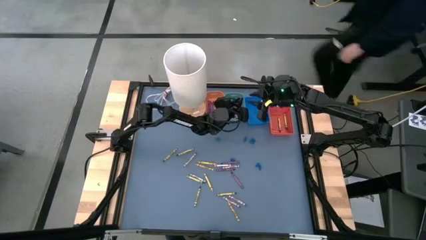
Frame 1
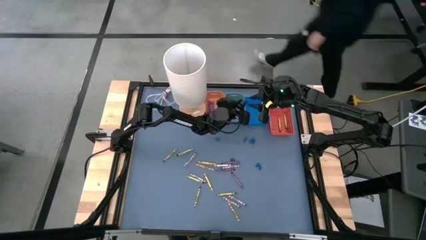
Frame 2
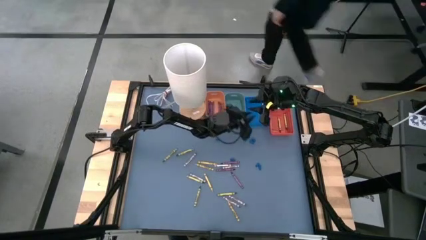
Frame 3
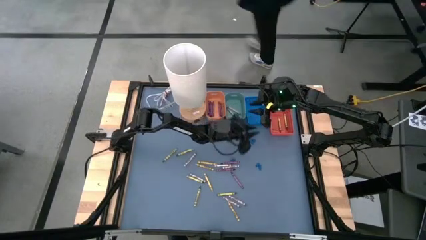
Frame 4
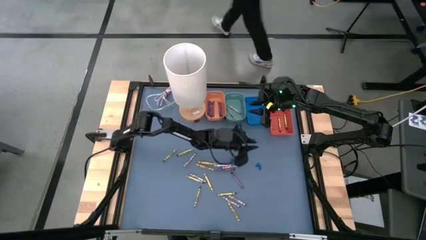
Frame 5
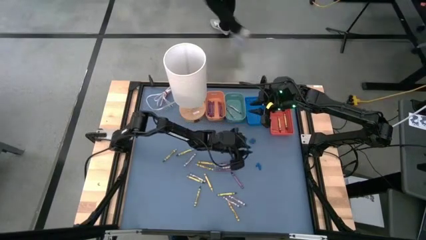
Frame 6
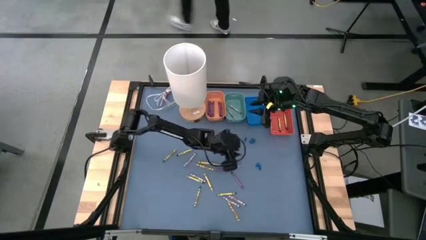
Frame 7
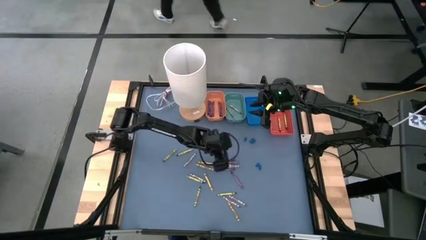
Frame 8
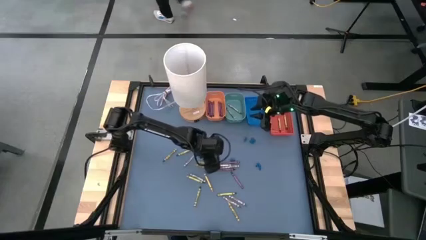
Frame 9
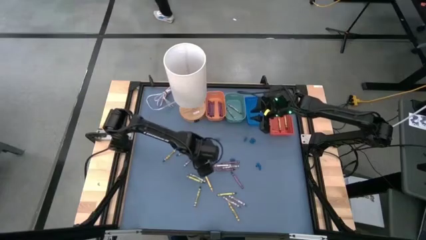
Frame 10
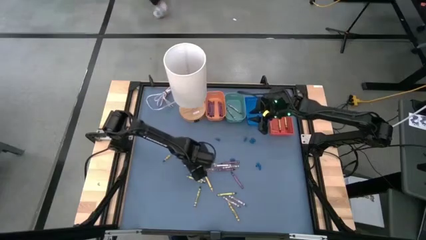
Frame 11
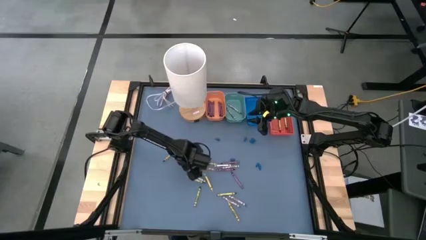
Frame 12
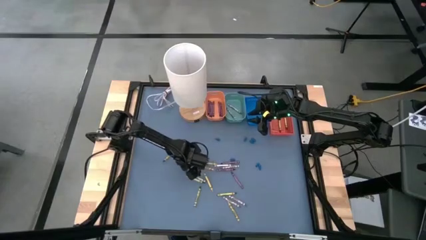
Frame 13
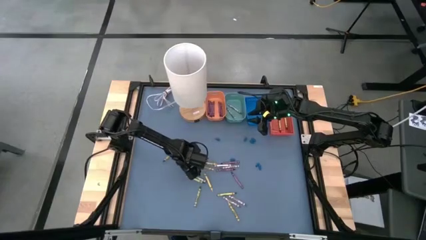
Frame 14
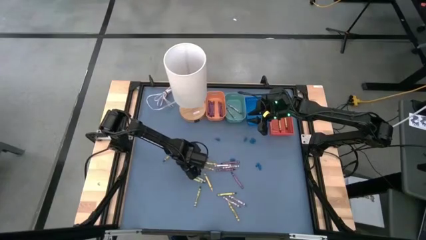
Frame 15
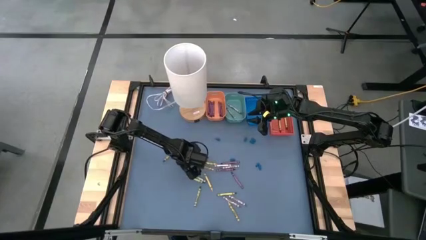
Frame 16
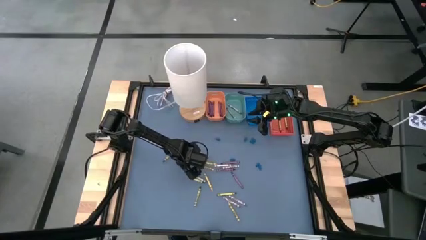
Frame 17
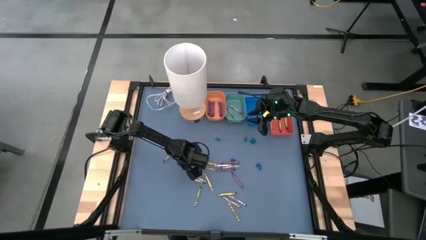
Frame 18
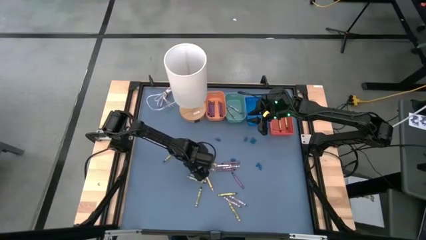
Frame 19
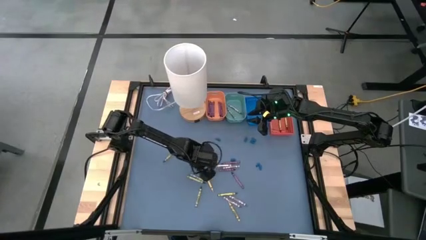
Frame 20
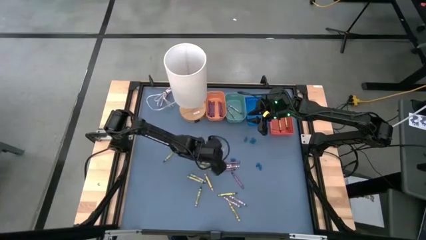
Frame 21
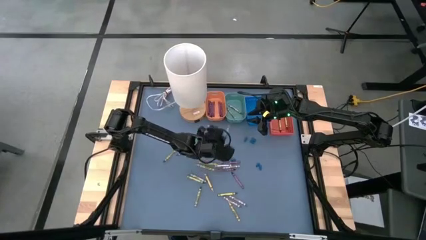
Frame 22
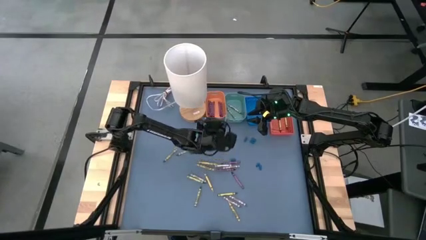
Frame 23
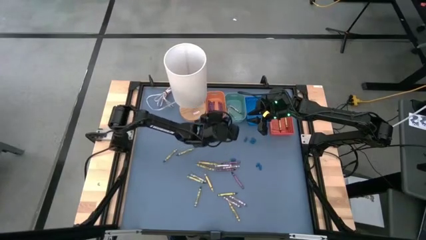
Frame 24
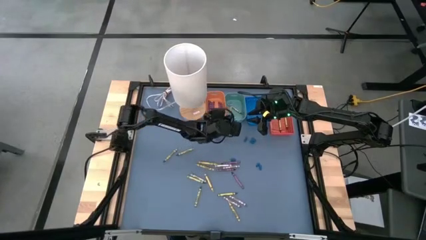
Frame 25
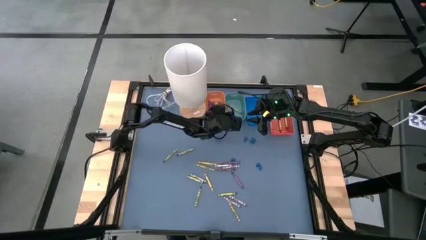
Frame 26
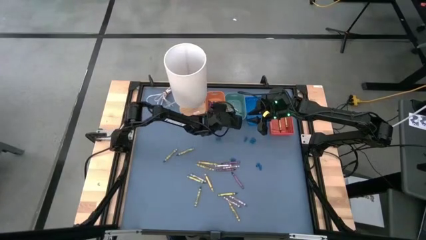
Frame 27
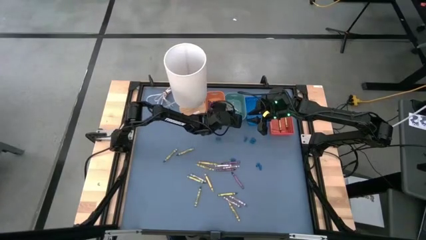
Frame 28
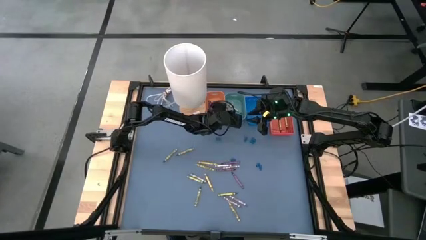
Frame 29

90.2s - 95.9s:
Task: Sort crayons
Put the gray crayon into the green bin

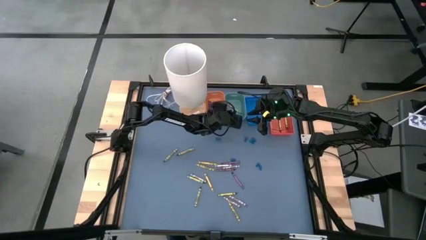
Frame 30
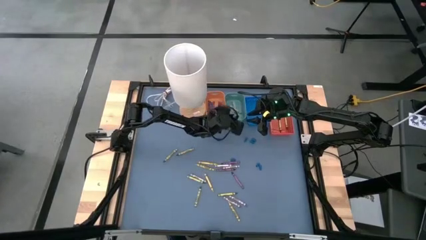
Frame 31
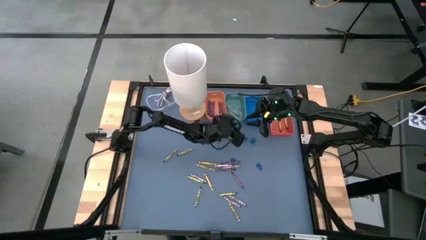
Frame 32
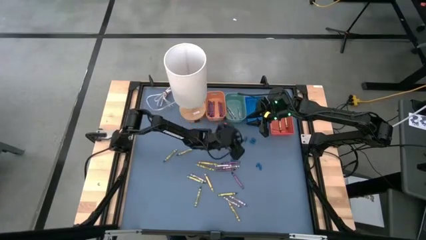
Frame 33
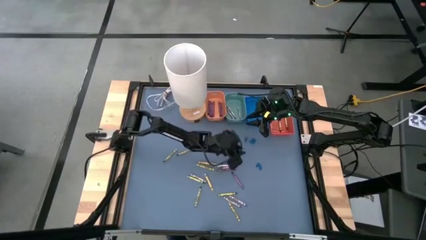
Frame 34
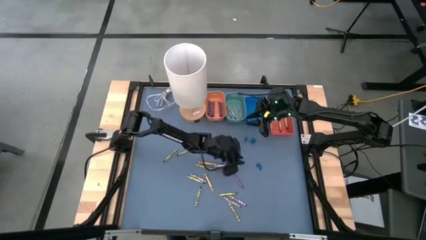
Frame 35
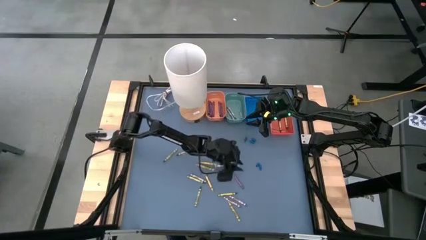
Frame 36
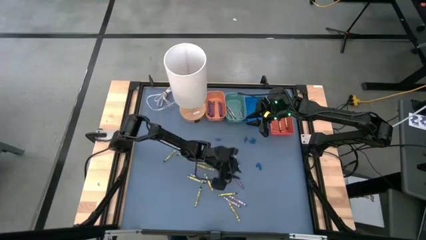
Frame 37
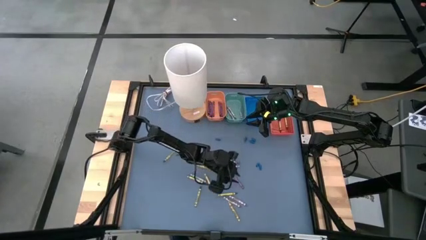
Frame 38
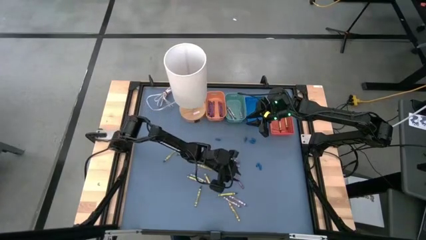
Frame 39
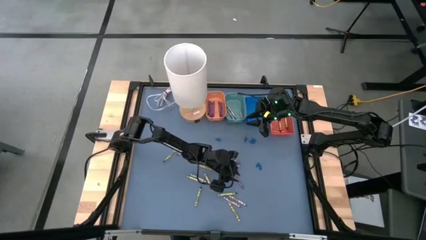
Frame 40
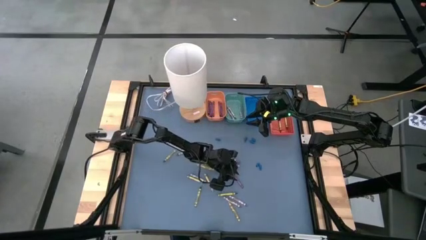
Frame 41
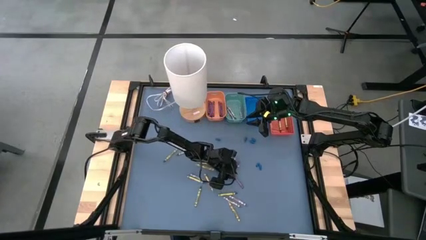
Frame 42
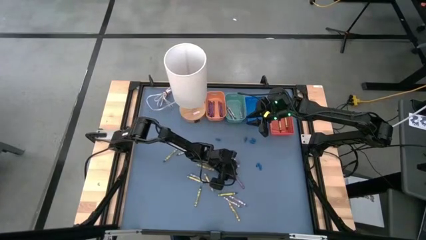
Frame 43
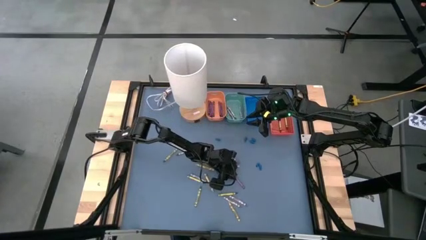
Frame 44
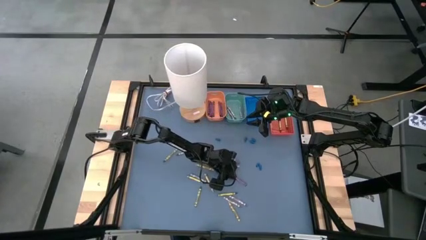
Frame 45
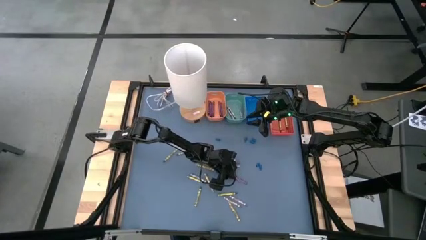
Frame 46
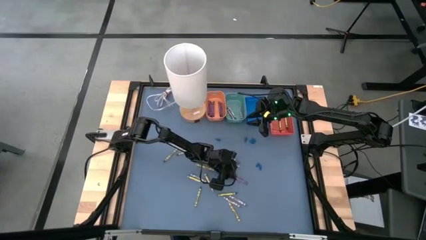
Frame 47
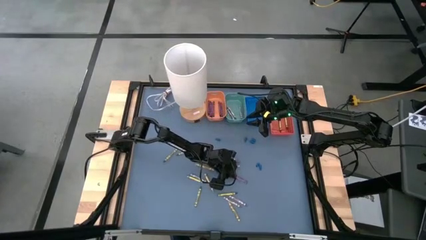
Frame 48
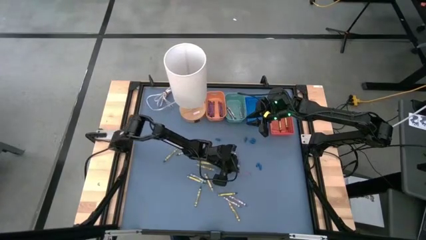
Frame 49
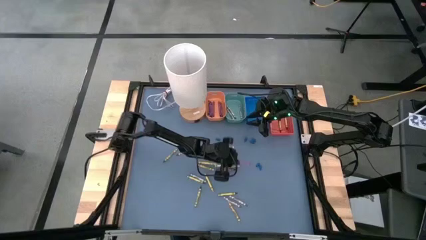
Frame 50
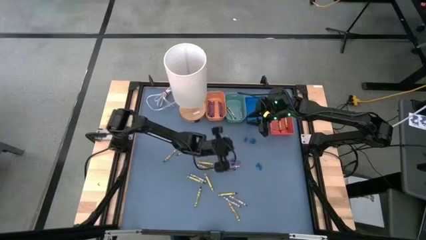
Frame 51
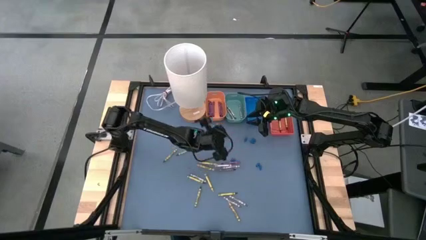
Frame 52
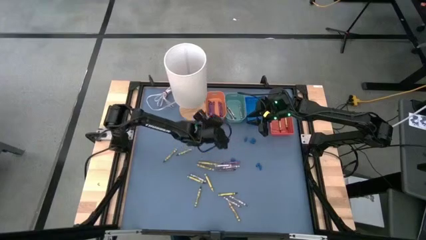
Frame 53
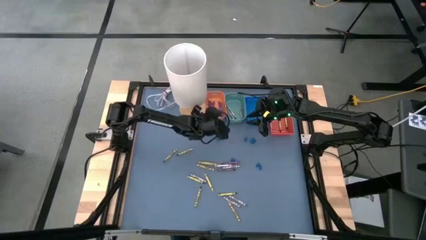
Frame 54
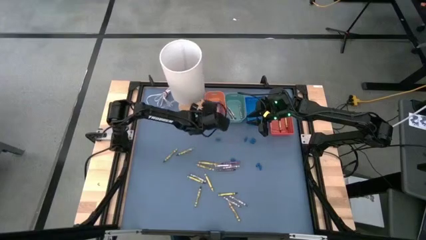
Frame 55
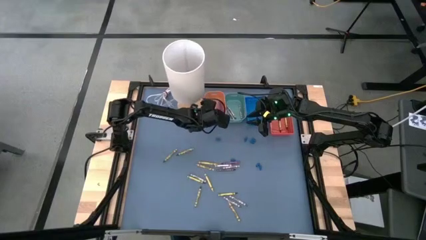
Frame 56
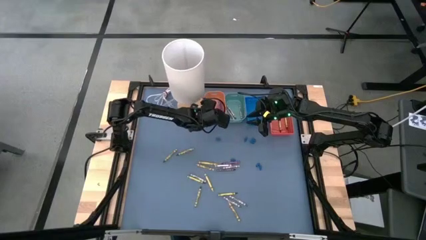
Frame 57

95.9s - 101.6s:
Put the purple crayon into the light orange bin

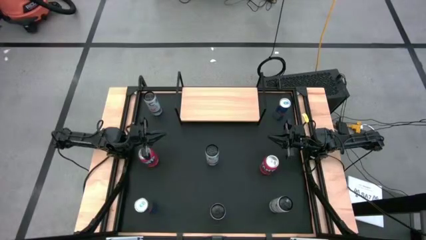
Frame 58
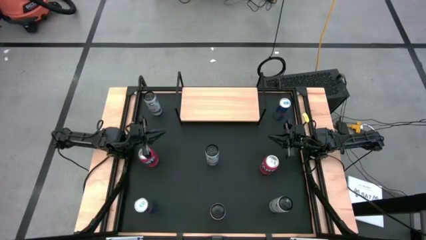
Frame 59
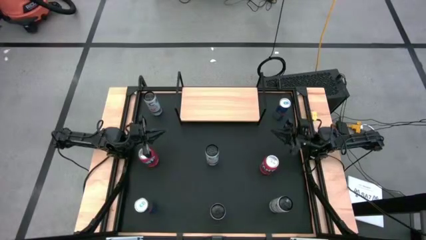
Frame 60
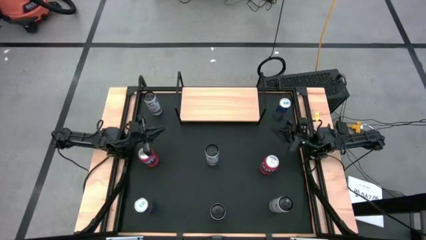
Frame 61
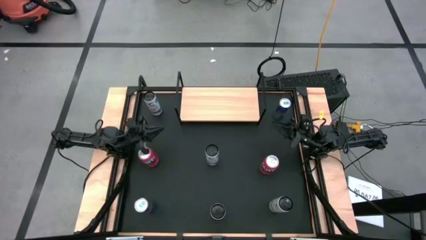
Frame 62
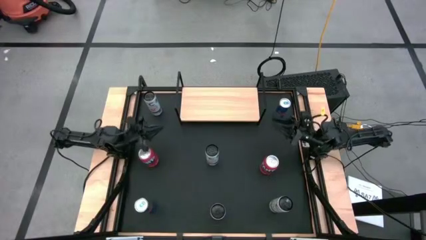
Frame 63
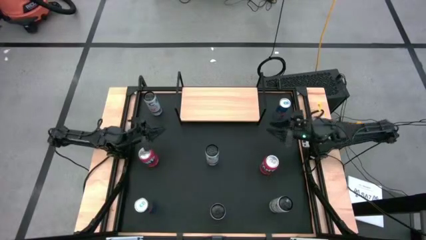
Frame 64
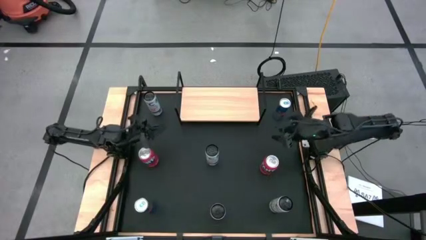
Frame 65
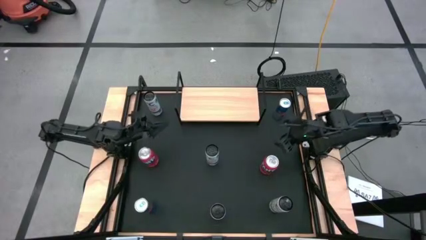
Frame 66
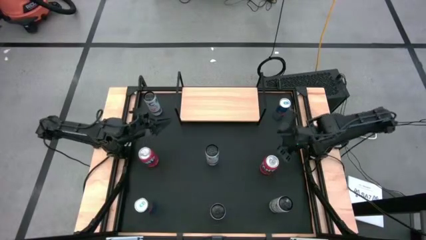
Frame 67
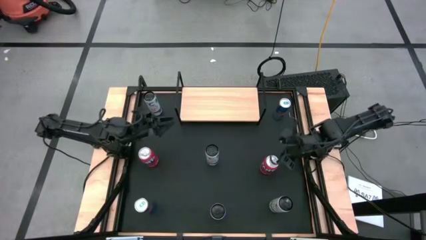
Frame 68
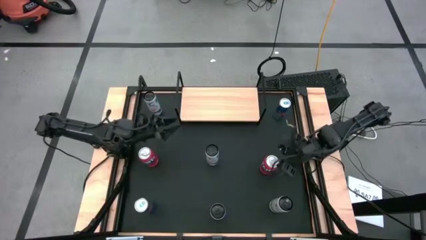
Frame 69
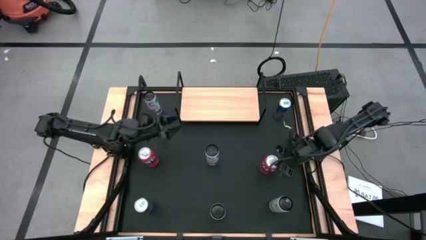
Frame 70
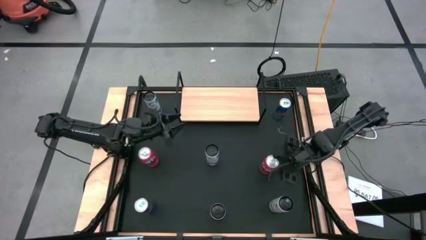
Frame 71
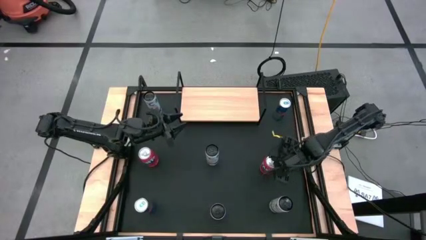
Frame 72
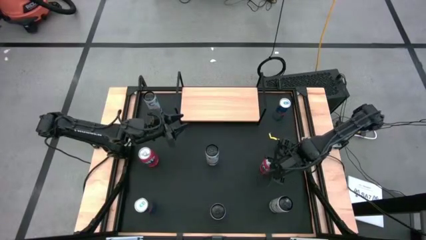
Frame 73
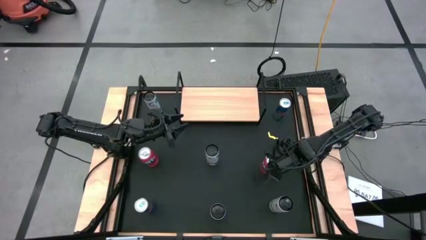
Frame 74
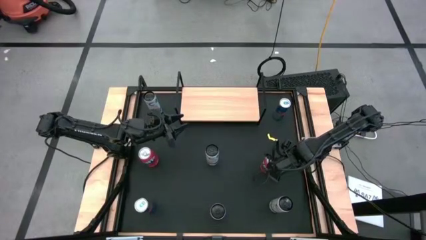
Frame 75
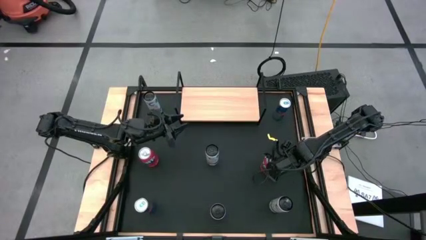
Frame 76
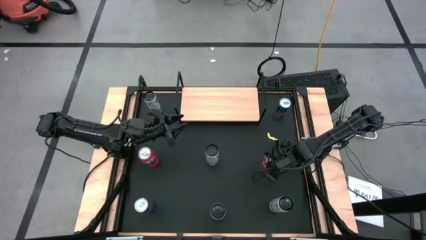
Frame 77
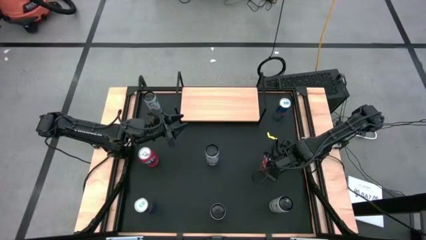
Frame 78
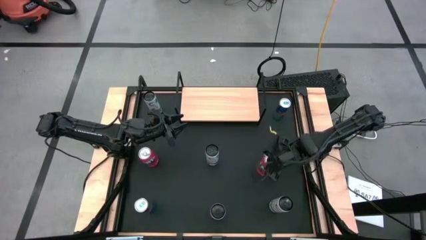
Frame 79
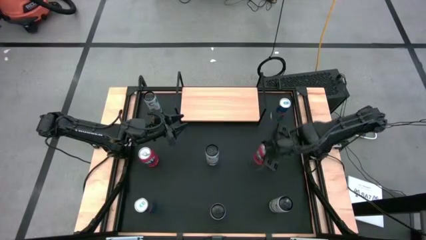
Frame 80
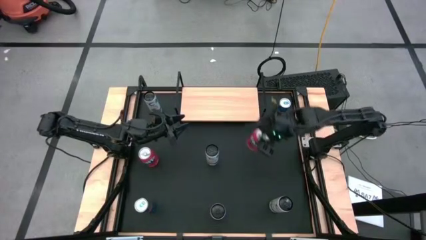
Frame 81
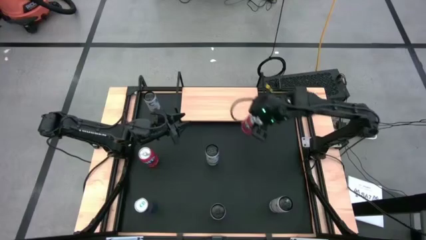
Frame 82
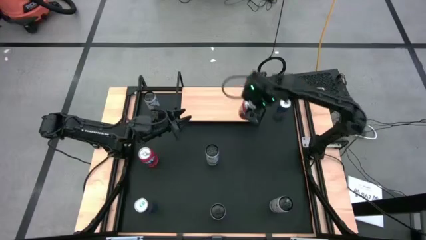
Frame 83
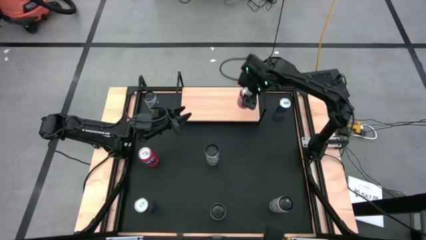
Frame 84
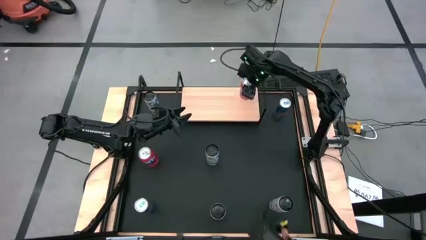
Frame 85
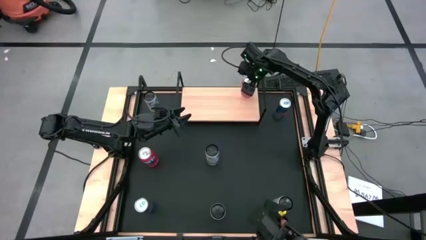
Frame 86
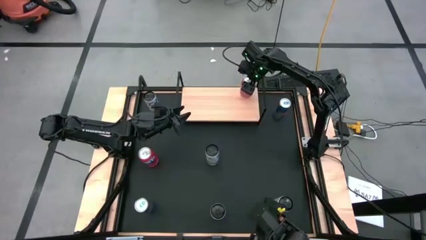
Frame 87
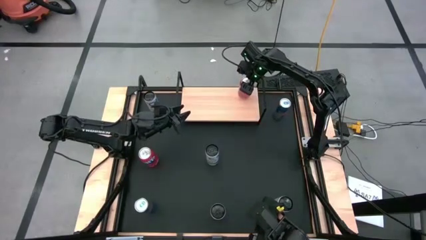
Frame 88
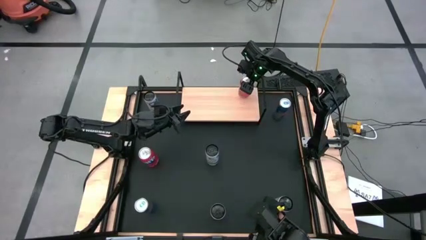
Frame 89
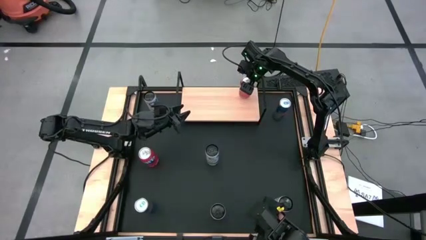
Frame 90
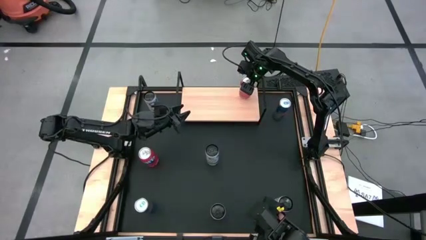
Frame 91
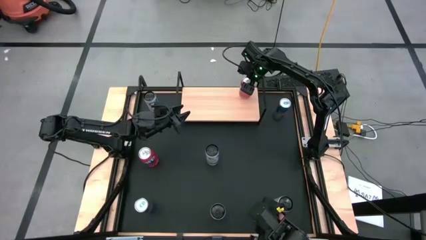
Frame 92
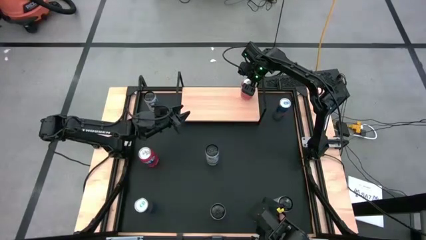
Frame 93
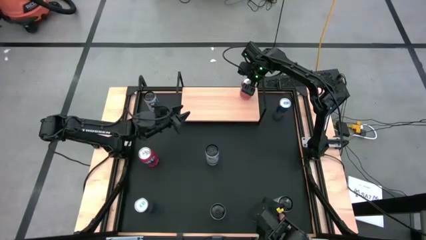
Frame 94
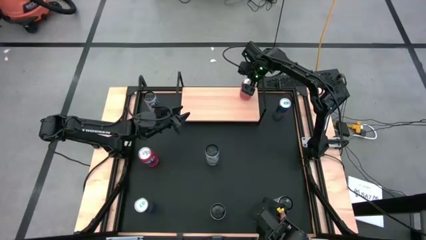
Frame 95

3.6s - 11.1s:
Task: Place canned beverage on shelf
Put the right red soda can on the shelf
